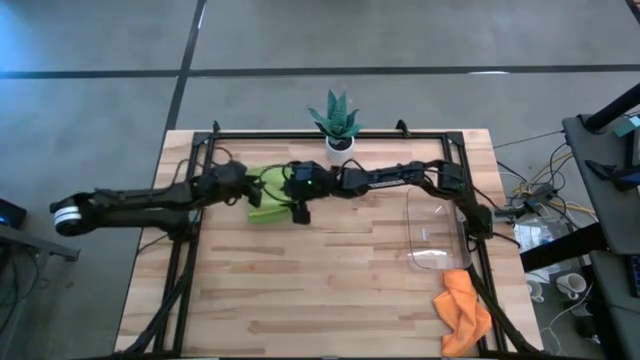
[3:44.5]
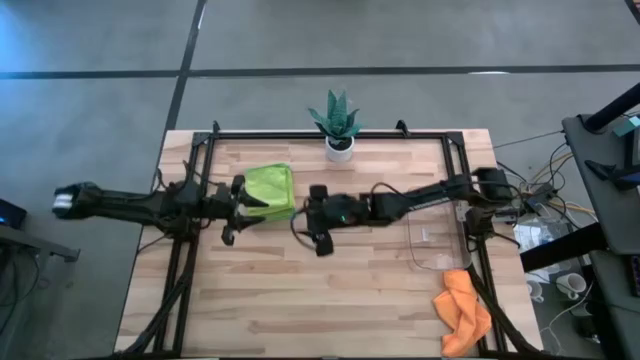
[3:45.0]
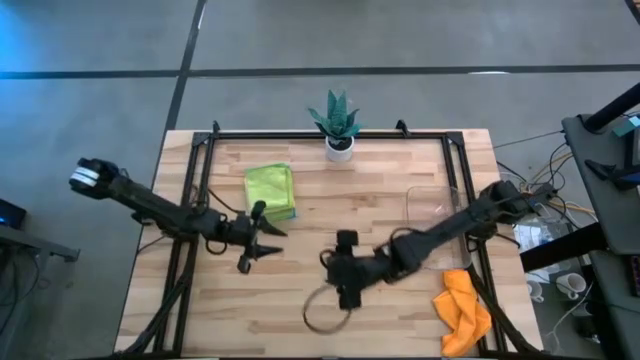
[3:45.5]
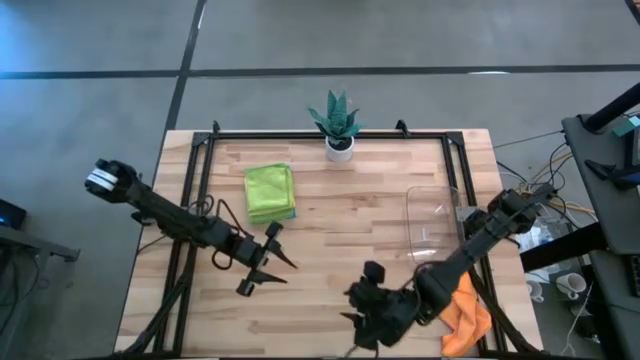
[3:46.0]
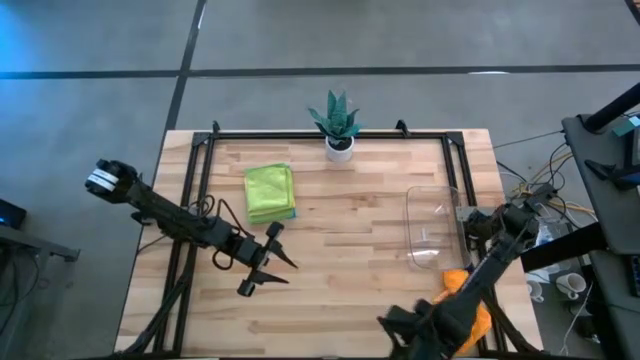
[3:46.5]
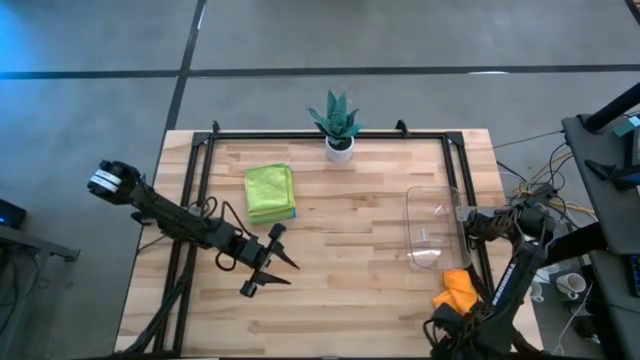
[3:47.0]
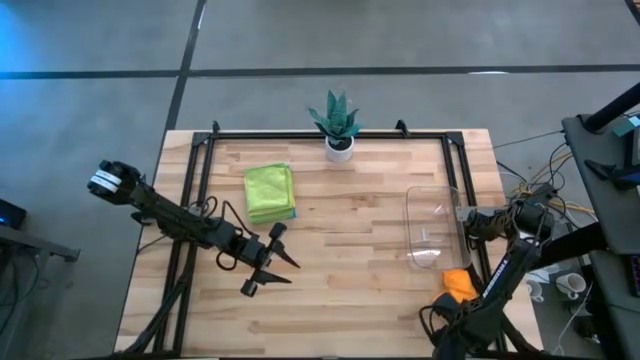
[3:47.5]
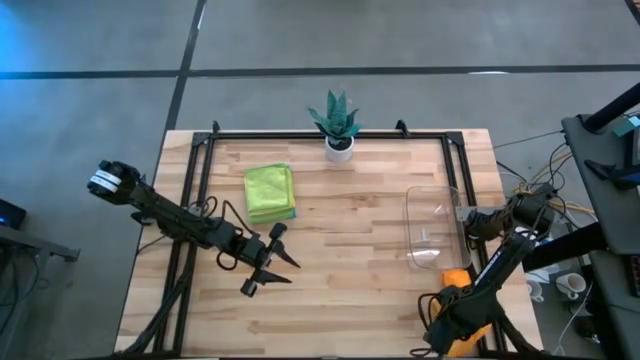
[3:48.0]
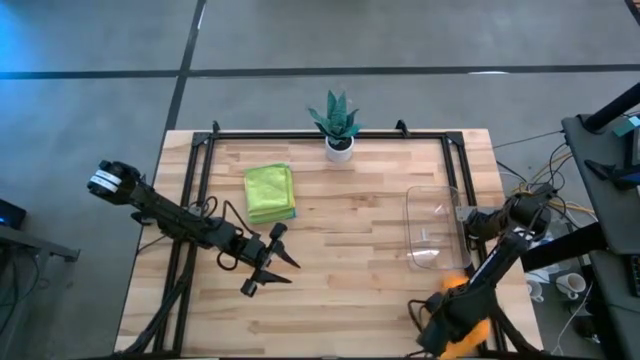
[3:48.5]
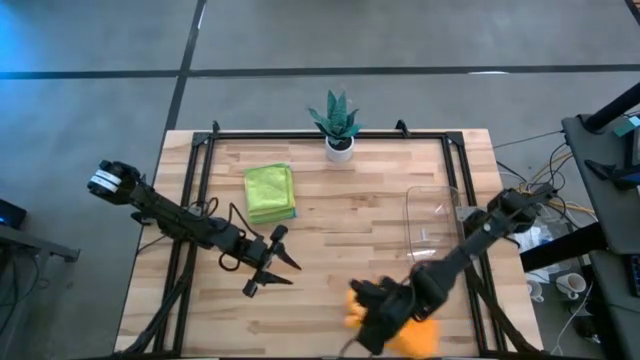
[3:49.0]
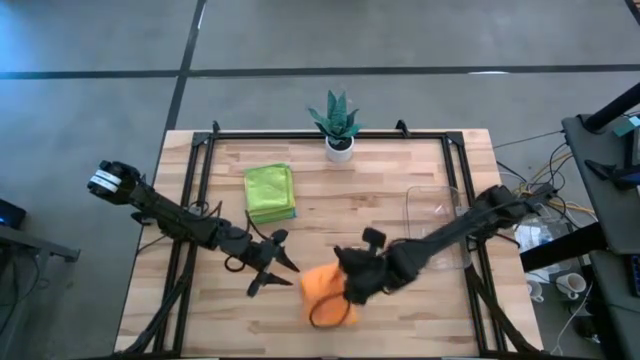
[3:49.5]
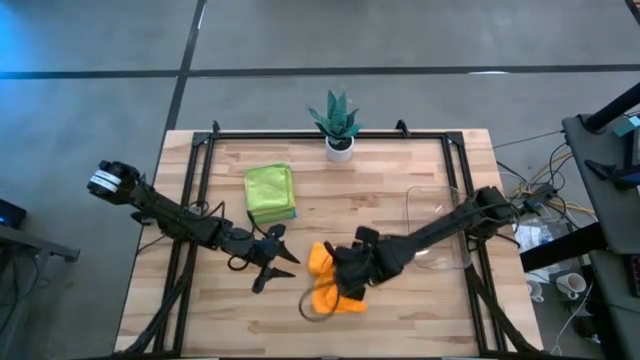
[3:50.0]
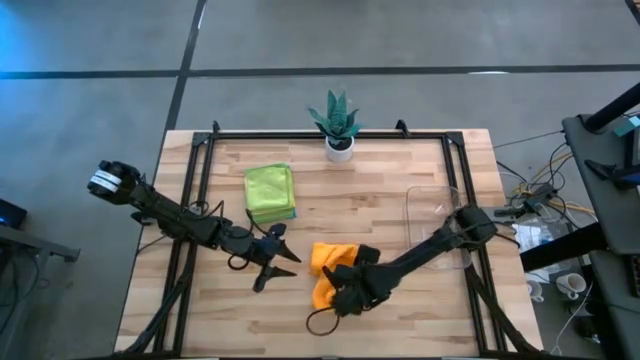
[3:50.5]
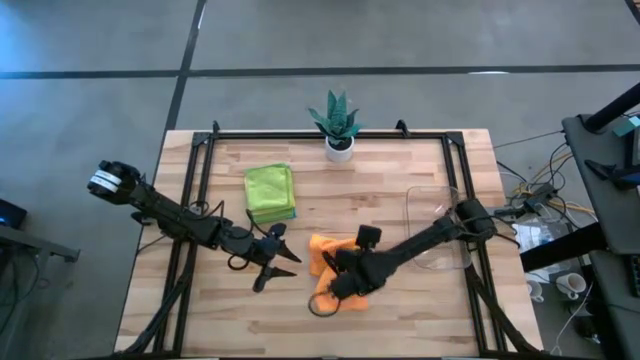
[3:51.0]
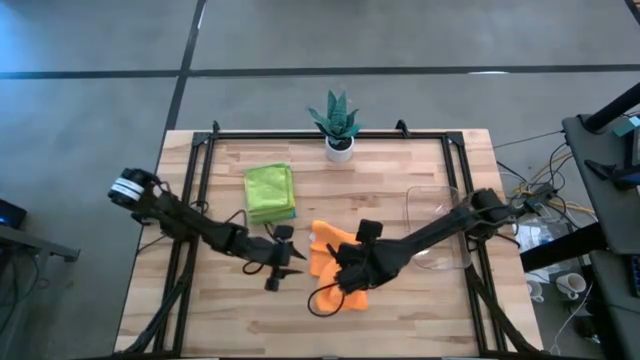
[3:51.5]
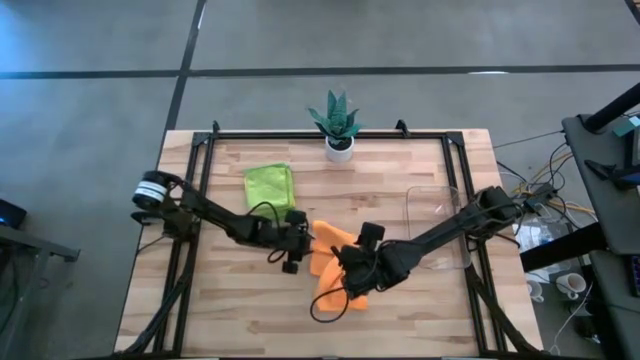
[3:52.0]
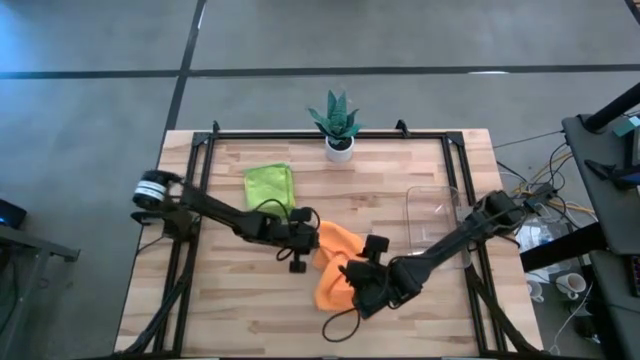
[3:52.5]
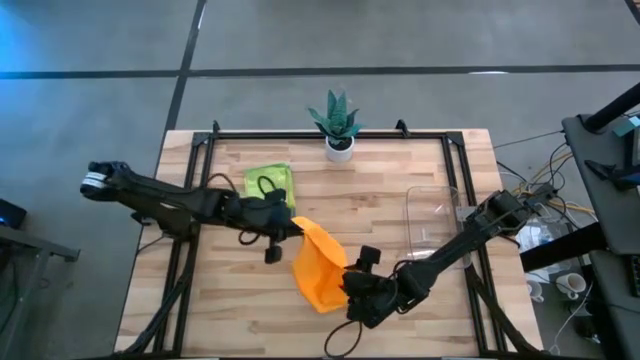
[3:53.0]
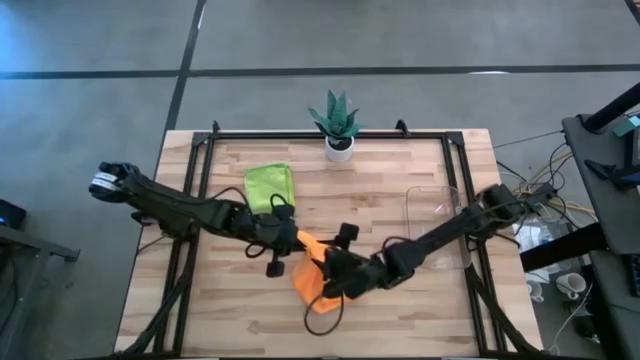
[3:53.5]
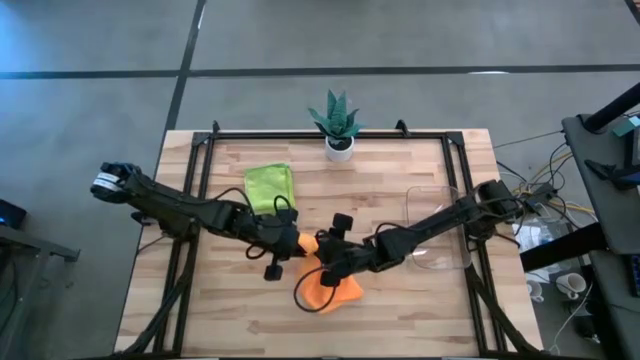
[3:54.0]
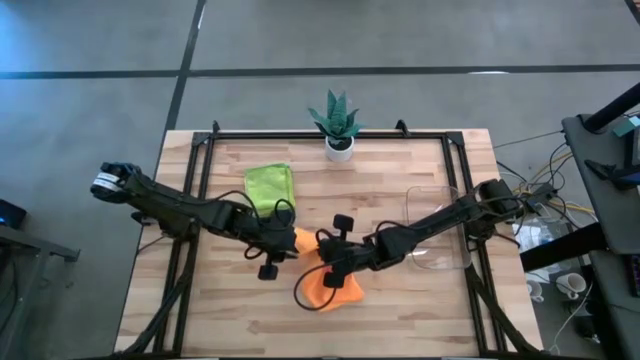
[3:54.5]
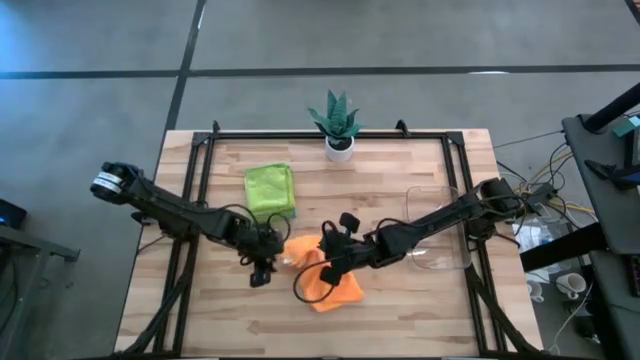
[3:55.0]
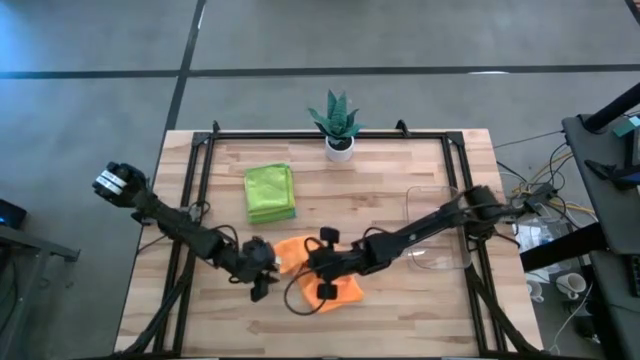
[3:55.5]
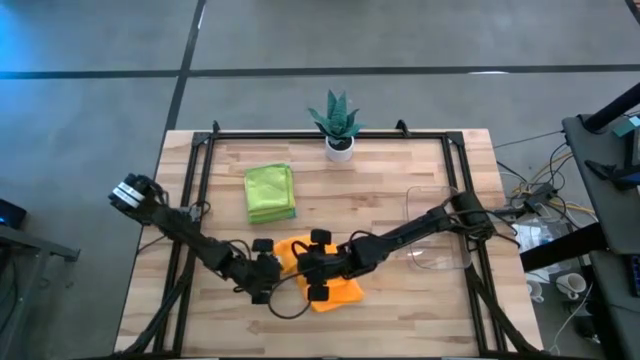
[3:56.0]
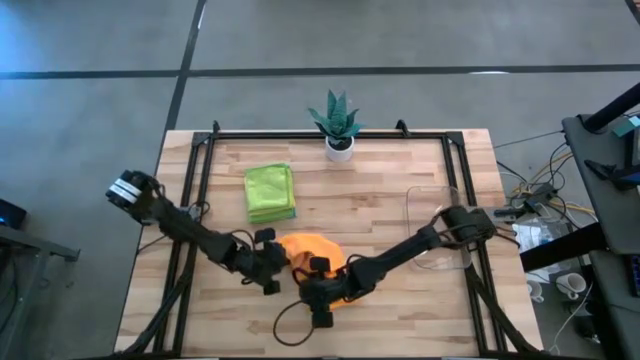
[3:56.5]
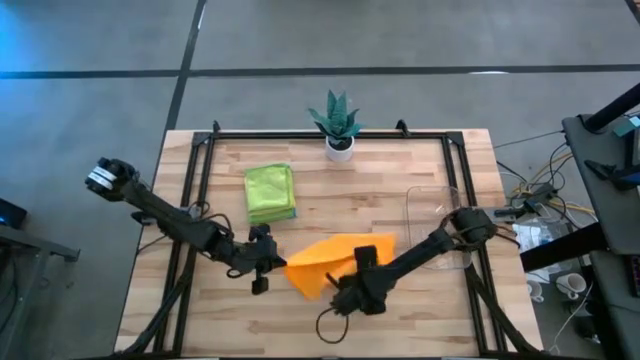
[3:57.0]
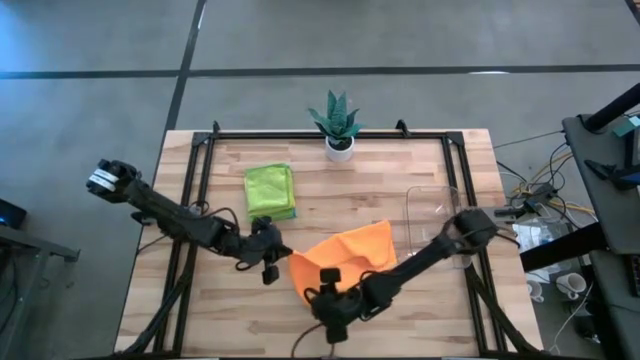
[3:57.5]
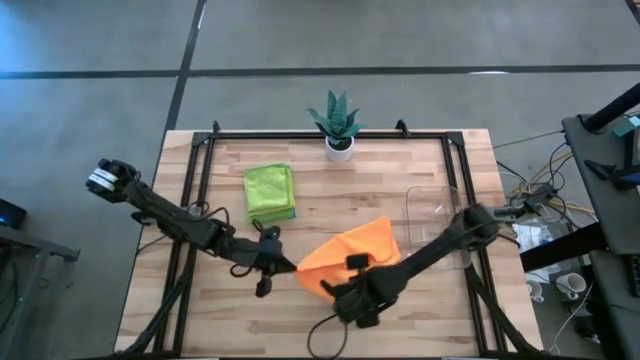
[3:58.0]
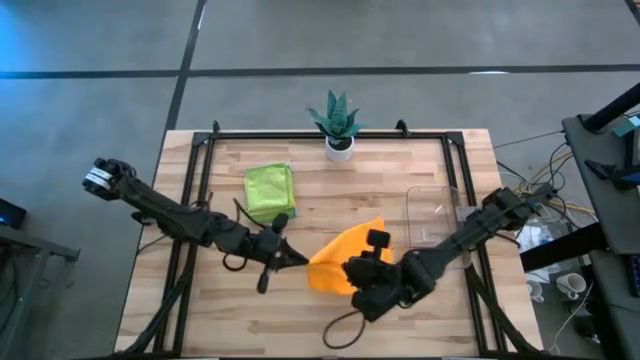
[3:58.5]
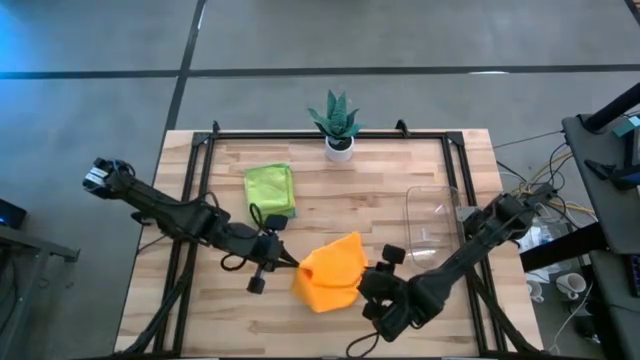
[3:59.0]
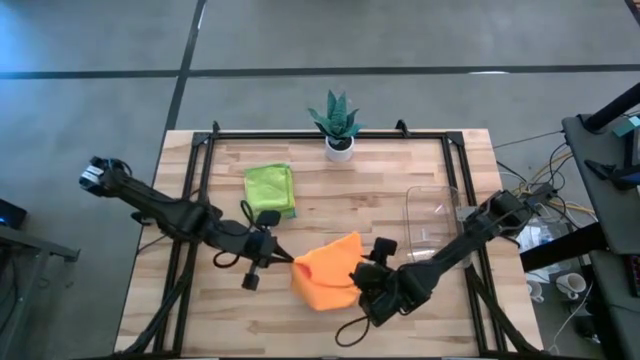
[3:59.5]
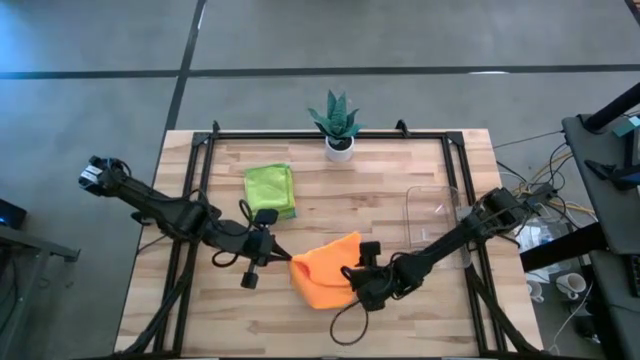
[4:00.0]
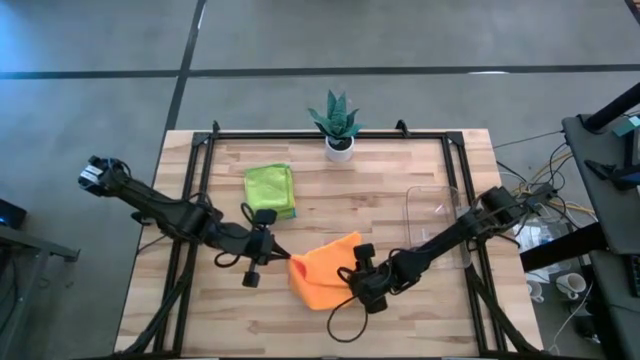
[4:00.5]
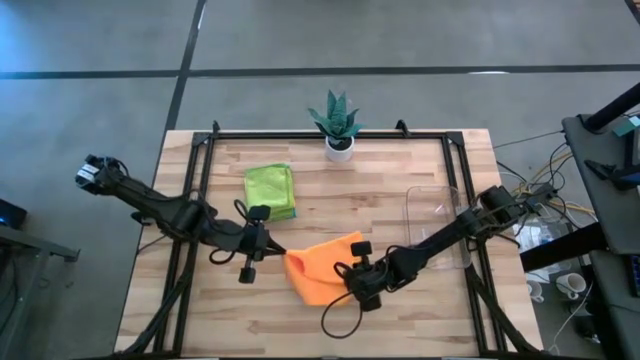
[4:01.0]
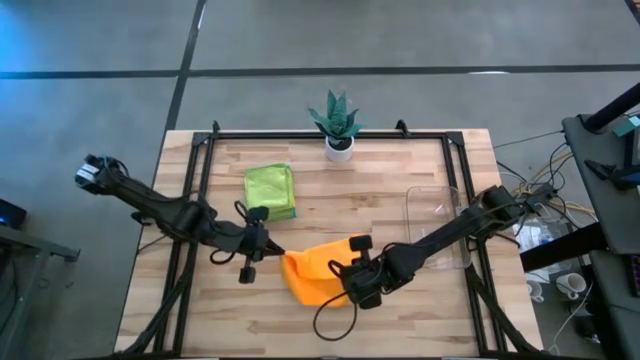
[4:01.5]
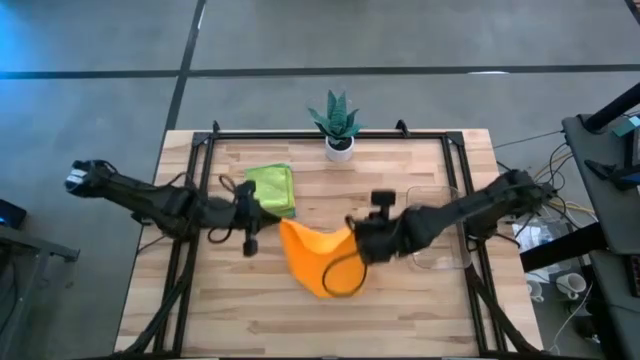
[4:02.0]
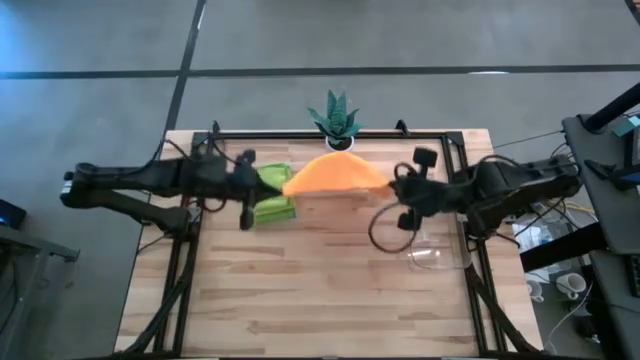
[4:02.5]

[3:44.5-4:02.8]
Task: Fold microfiber towels
Fold the orange towel on the table

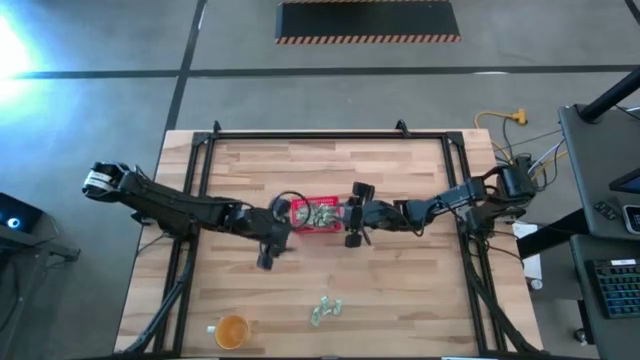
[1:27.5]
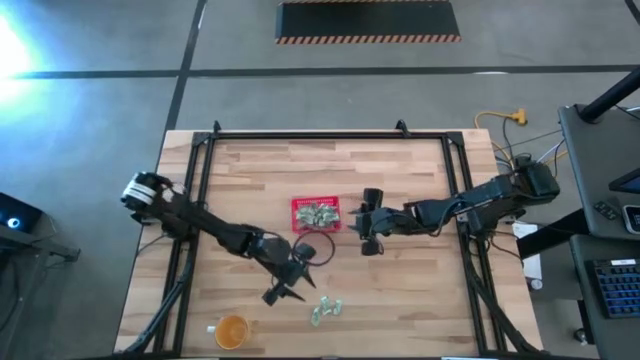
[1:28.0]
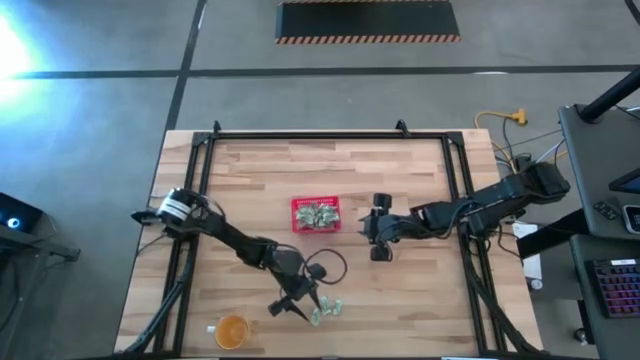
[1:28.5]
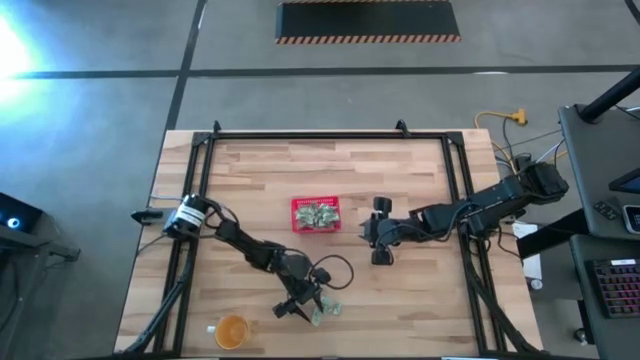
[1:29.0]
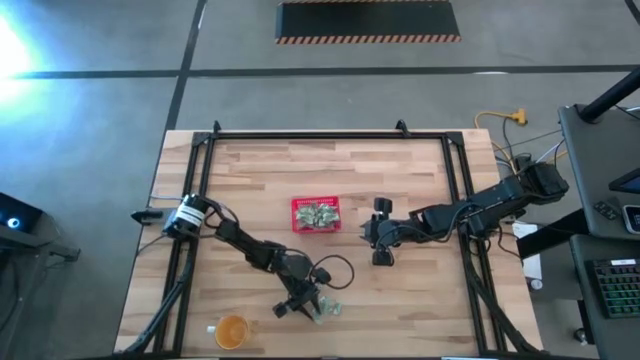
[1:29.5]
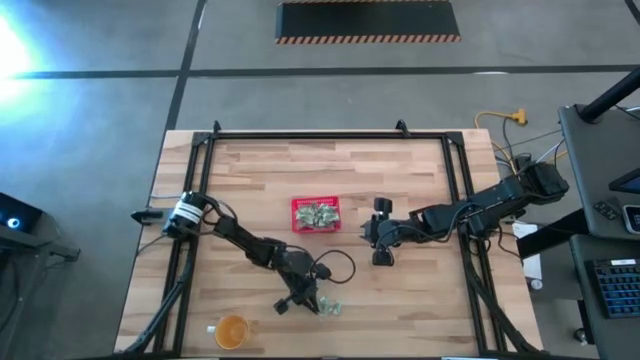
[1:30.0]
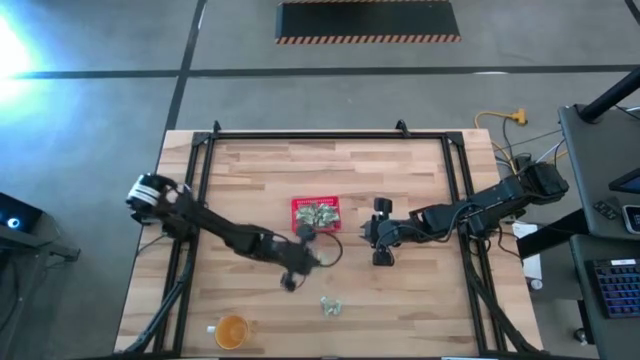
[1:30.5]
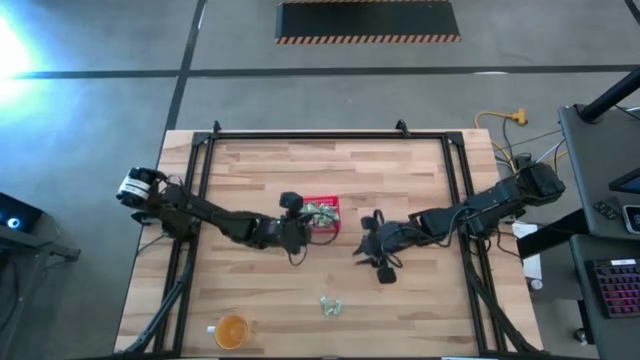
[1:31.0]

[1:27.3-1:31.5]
Task: Pick and place items into bin
Put the stevia packet into the red bin
